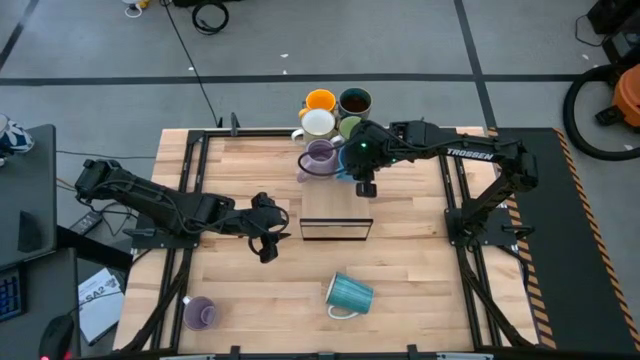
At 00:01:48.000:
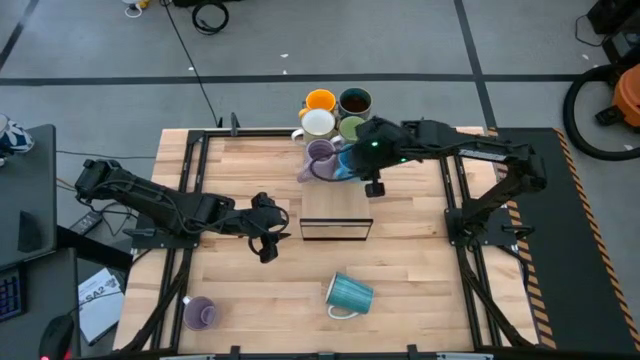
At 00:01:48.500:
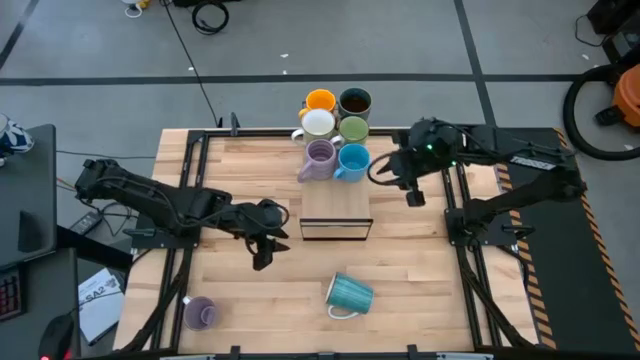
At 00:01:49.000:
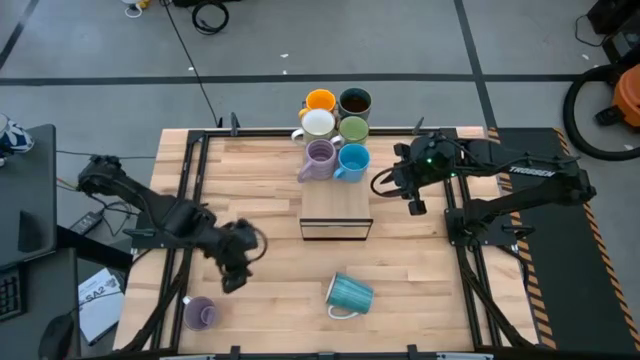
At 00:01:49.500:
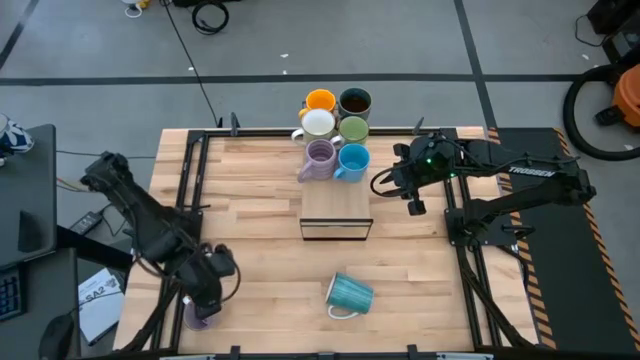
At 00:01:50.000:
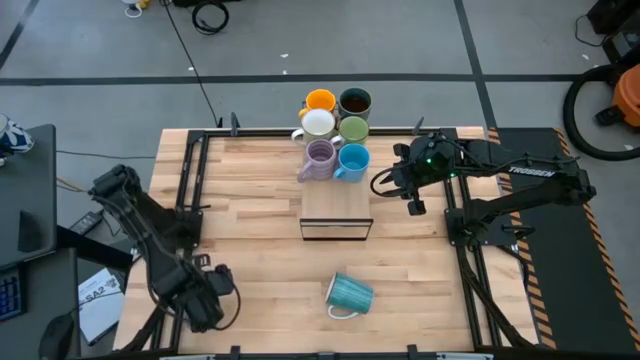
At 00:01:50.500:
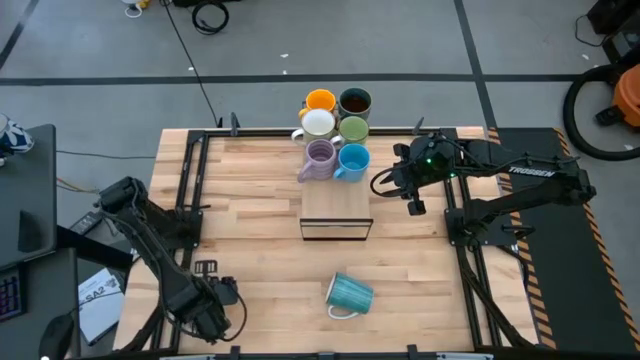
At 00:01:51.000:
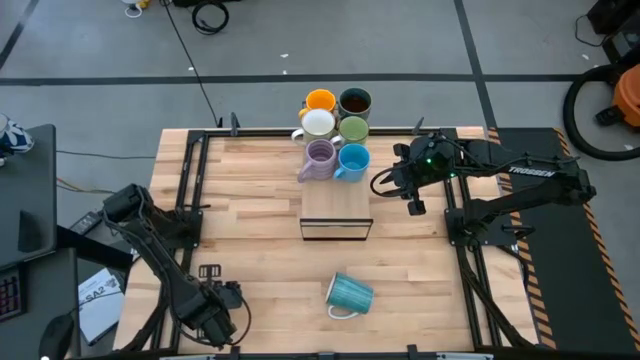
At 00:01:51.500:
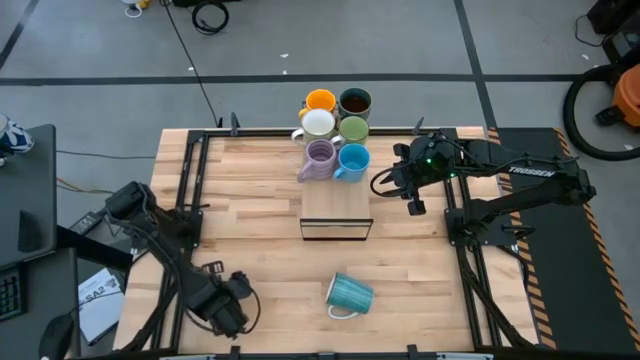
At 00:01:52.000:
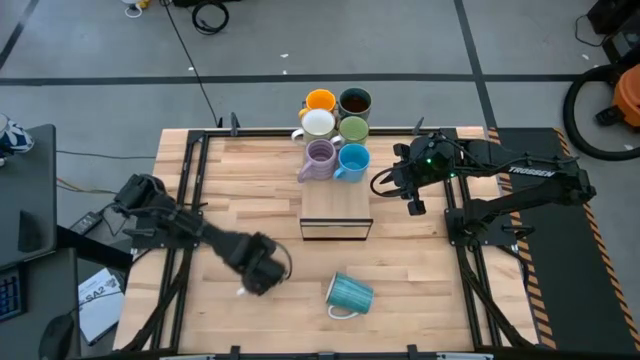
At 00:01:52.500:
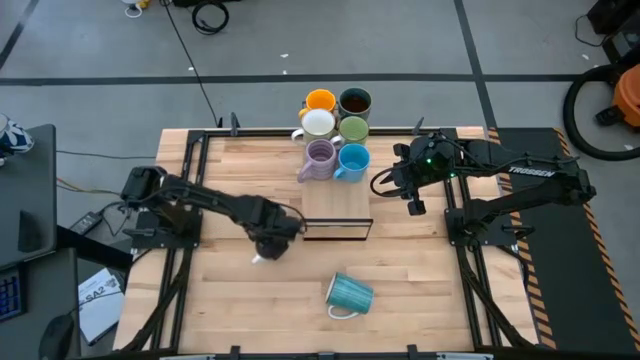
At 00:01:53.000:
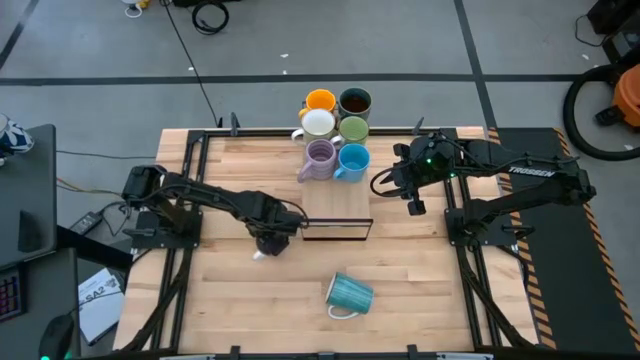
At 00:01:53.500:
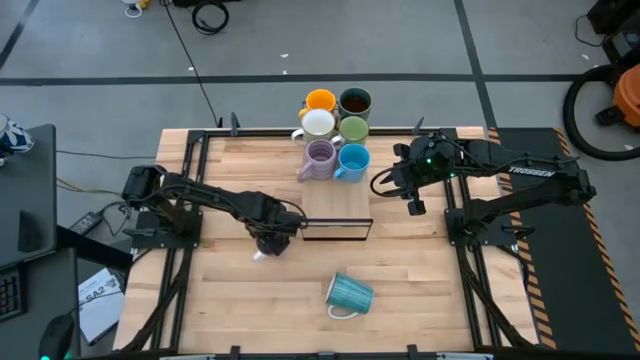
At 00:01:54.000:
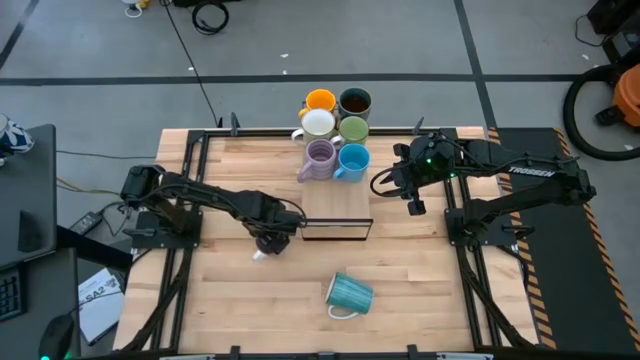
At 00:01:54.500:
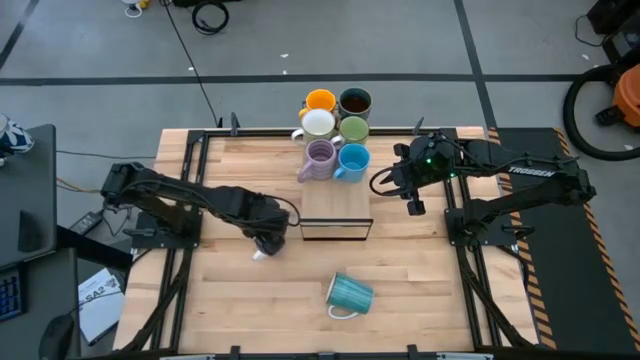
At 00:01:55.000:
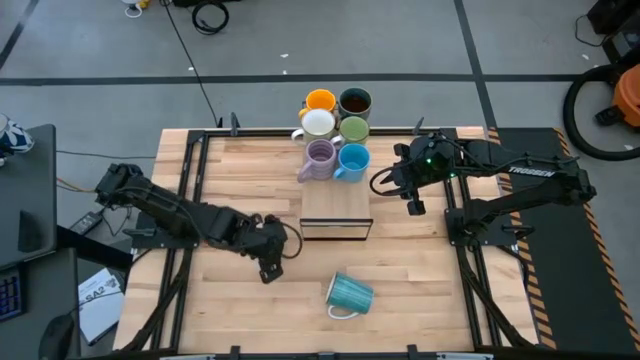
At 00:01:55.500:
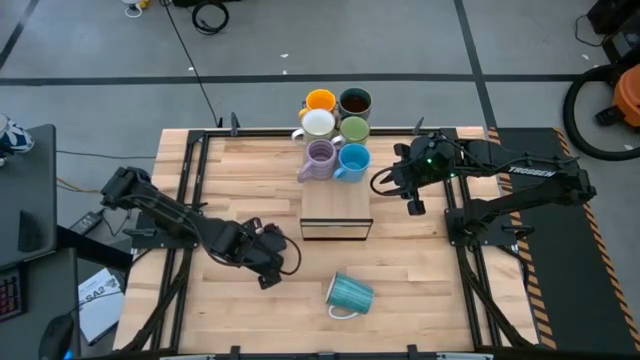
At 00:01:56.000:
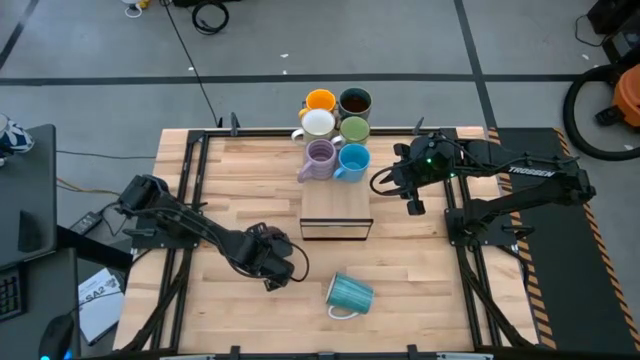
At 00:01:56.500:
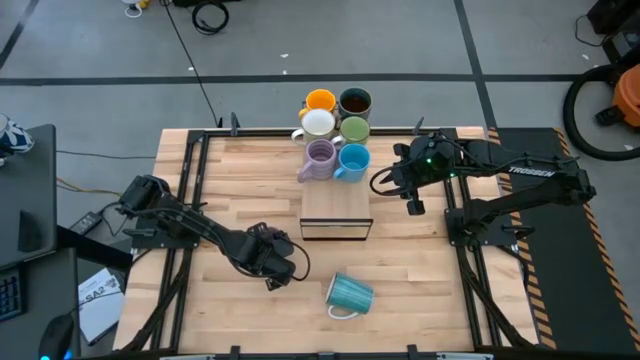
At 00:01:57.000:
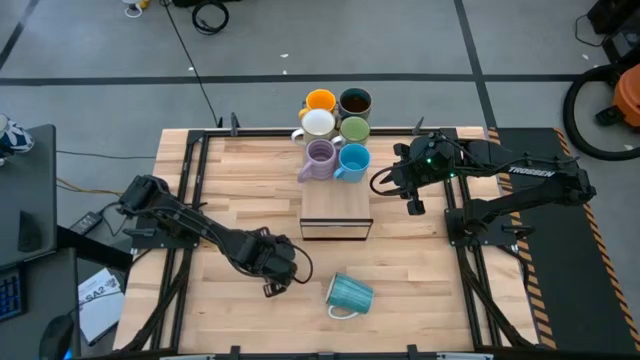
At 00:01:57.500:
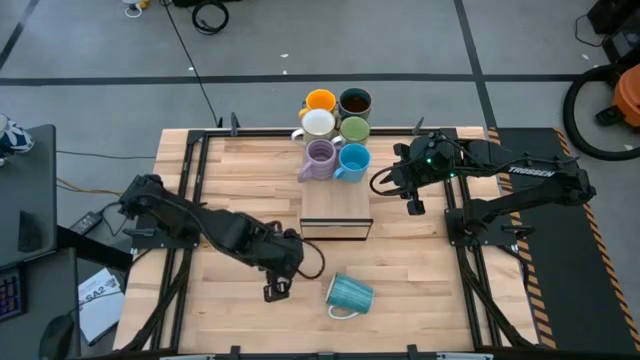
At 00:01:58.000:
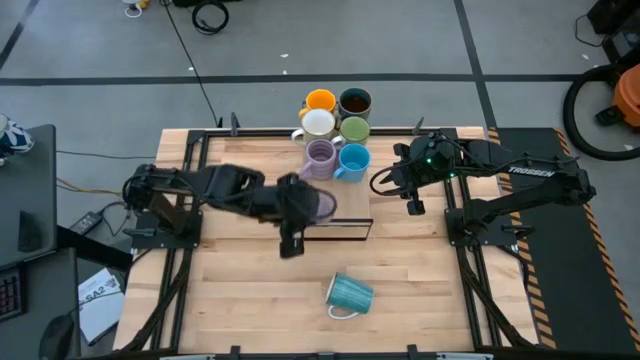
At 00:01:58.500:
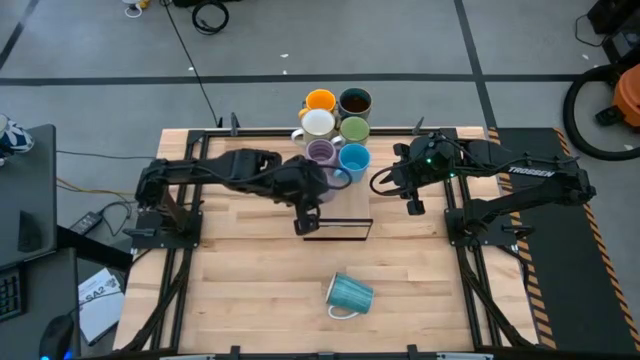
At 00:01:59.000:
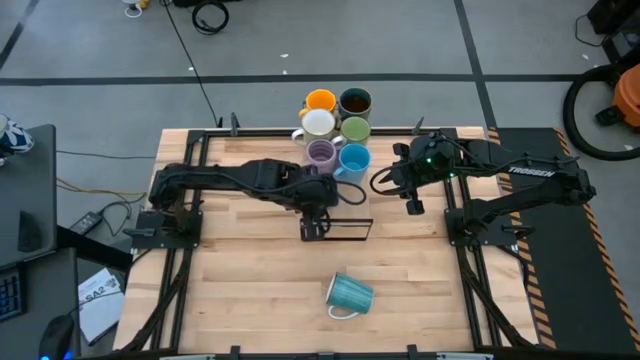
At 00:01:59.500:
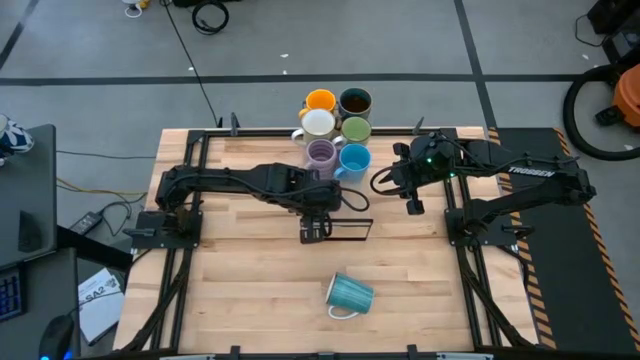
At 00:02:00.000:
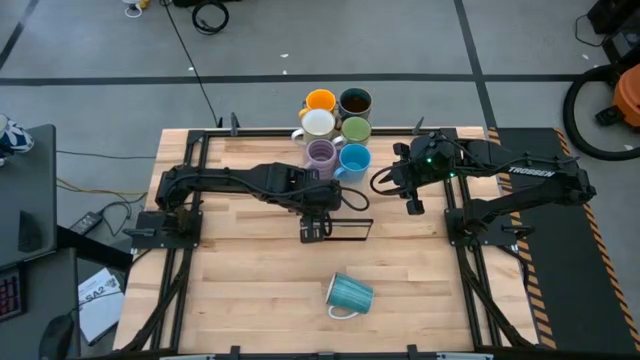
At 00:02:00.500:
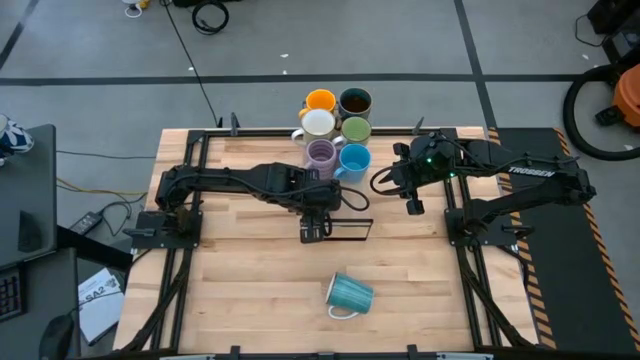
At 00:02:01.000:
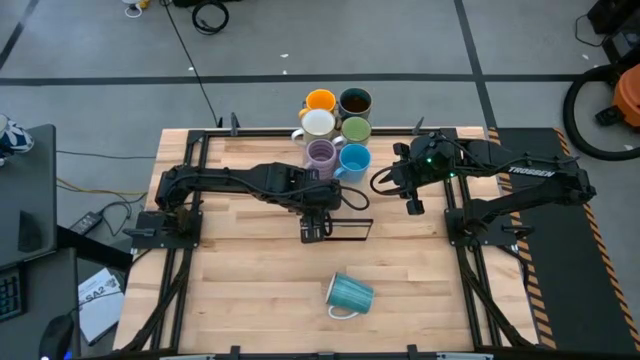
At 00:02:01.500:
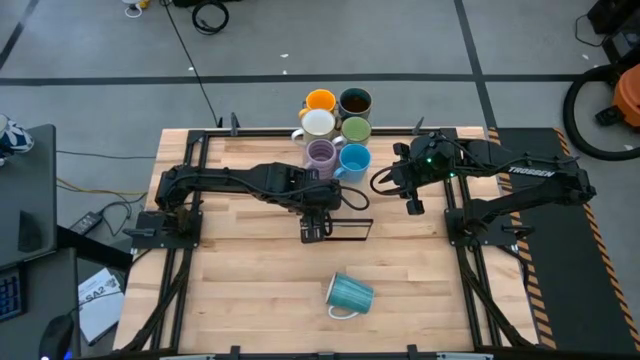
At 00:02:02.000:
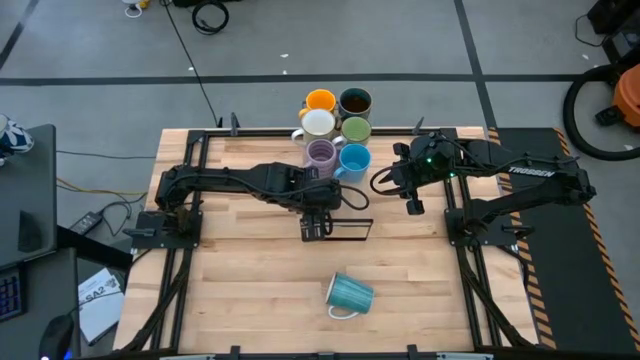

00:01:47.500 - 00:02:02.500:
Task: Place coffee mugs
Put the purple mug on the shelf
